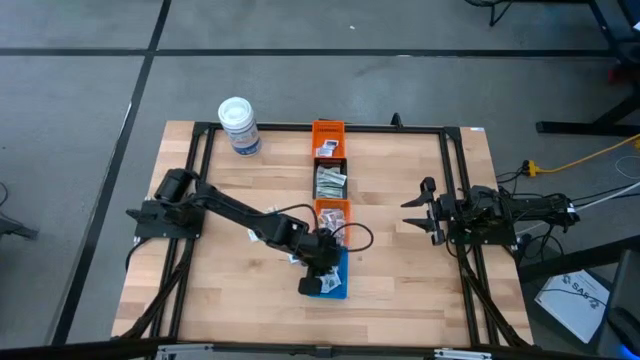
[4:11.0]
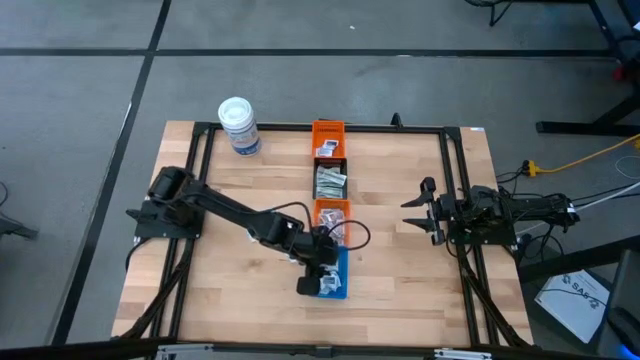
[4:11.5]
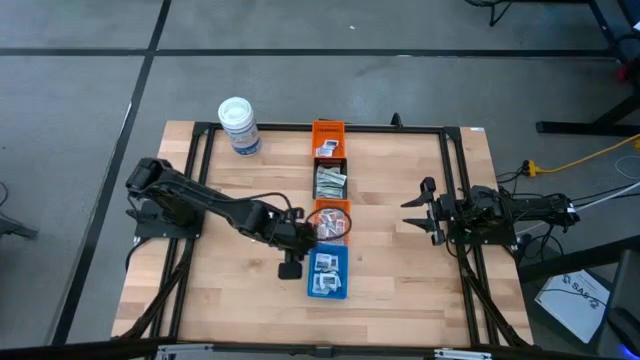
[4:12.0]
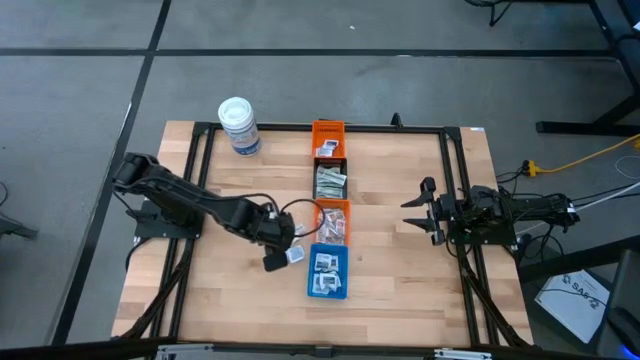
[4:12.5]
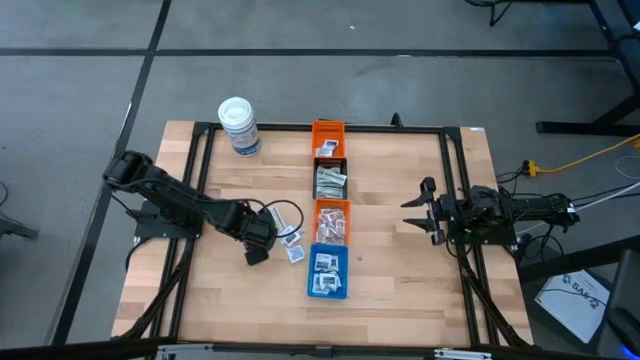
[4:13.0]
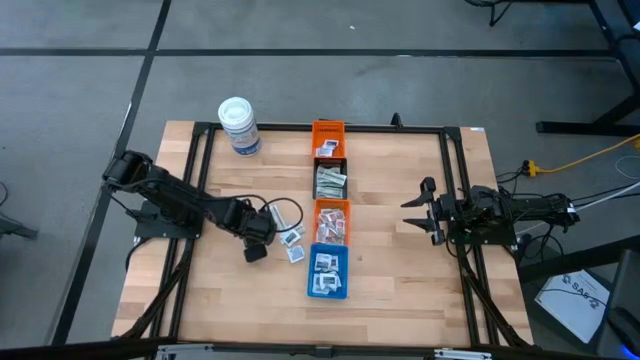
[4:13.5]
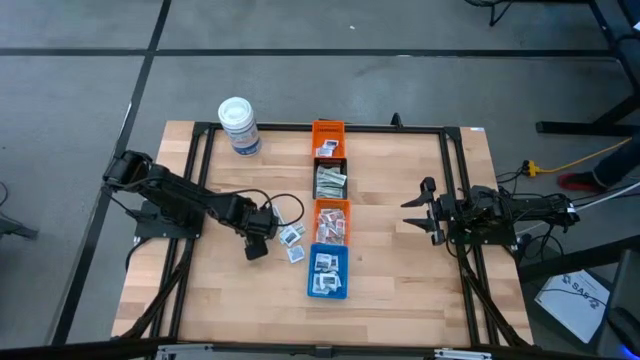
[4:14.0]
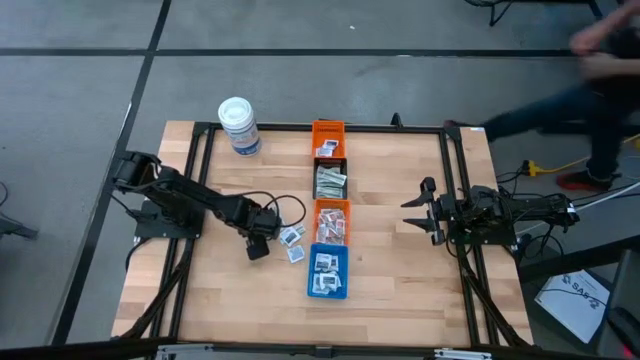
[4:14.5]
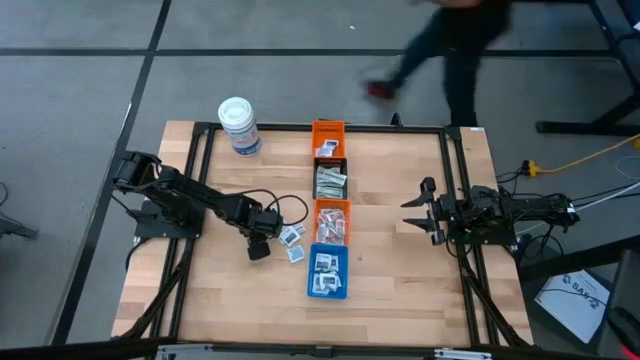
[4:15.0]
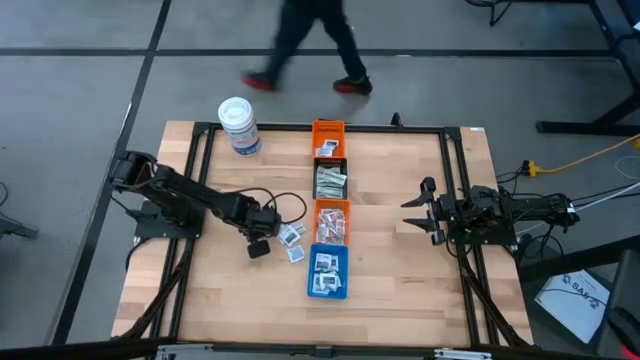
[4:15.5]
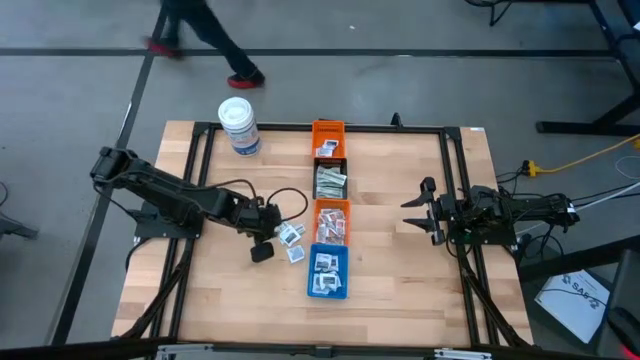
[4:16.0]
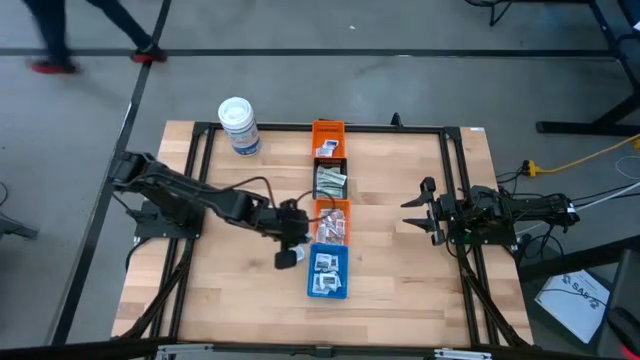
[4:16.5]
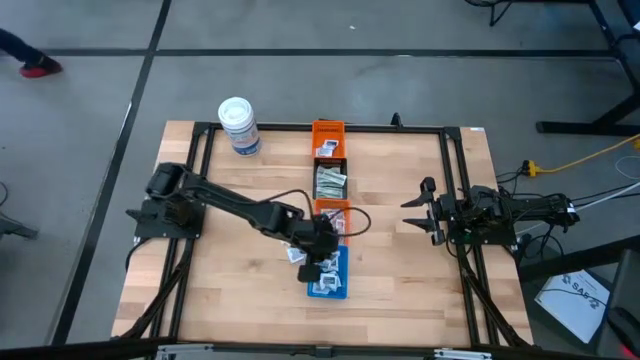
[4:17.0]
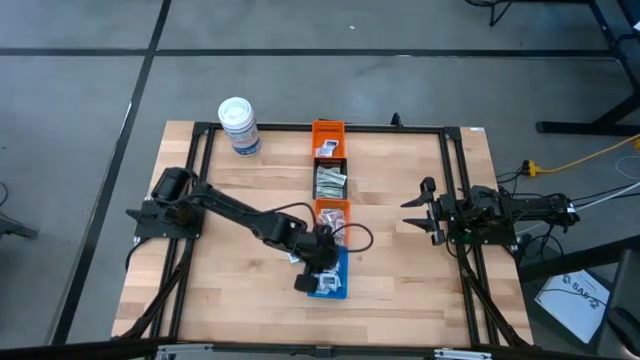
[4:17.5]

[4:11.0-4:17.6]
Task: Pick & Place First Aid Supplies
Put the gray towelette pack into the blue bin

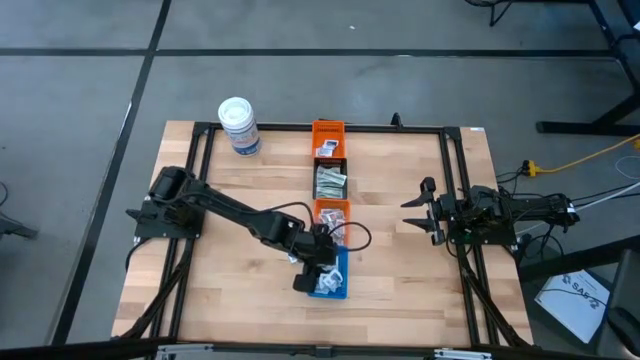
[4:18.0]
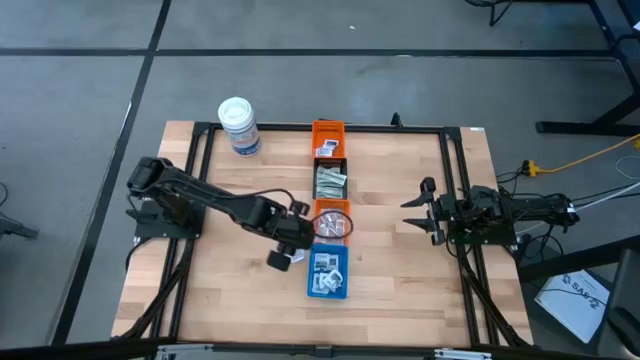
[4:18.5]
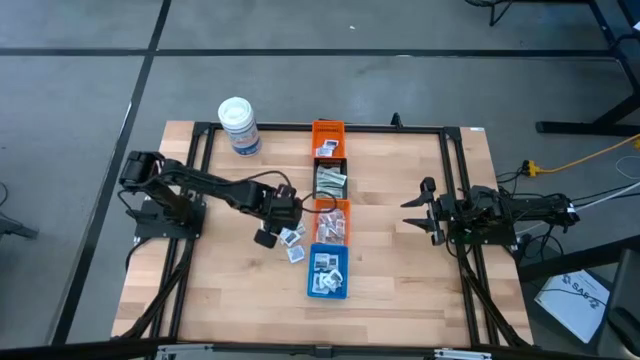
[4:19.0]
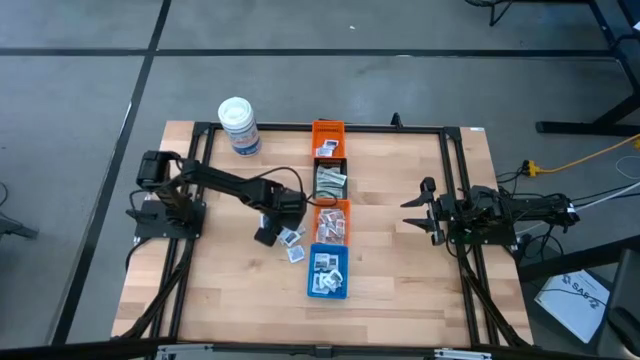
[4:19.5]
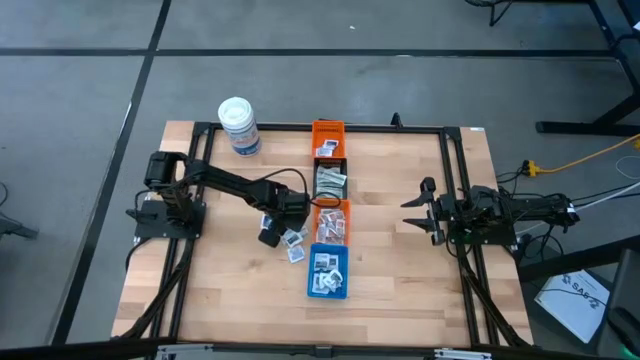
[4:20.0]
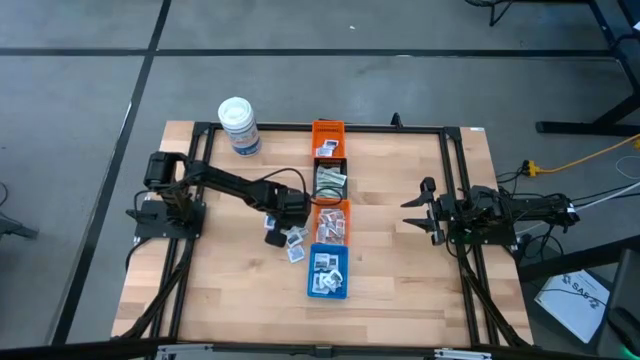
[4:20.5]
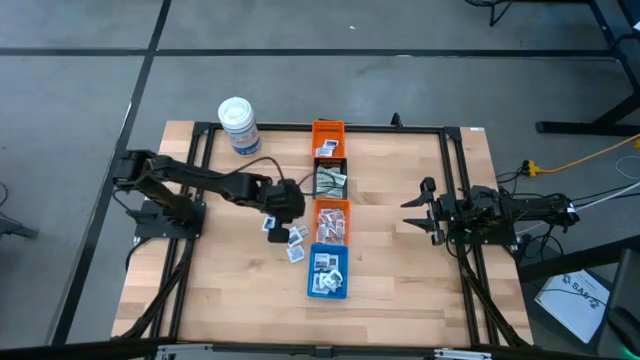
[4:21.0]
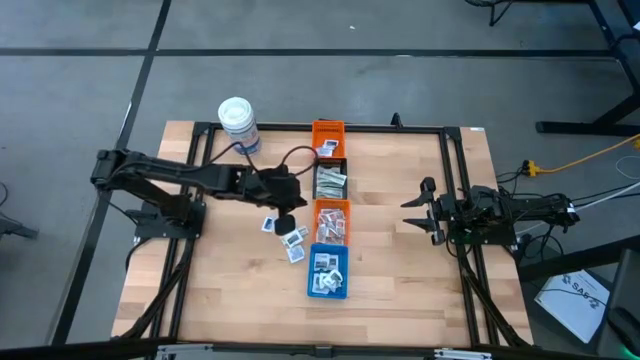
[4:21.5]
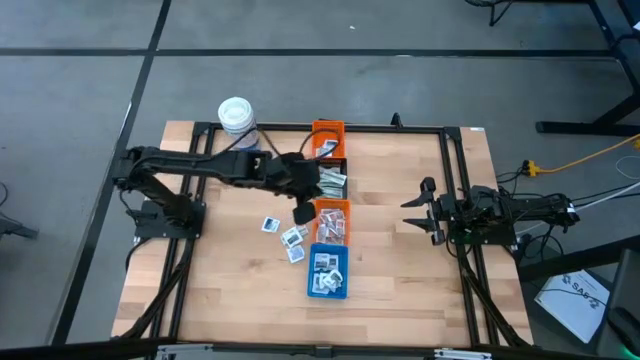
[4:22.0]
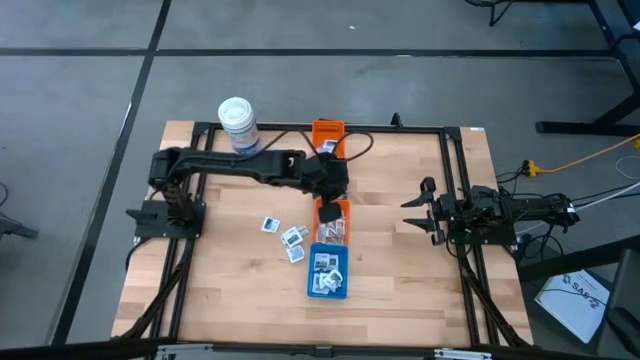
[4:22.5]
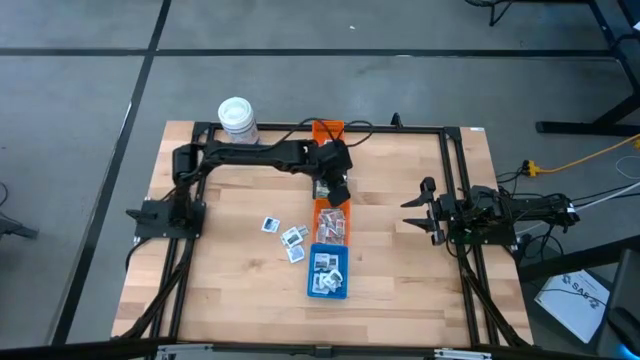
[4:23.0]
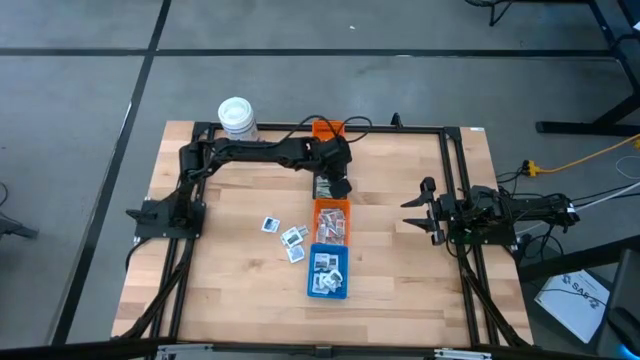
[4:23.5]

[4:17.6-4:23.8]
Put the green bandage into the black bin

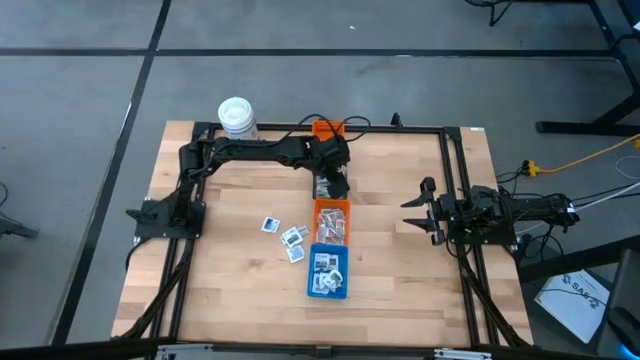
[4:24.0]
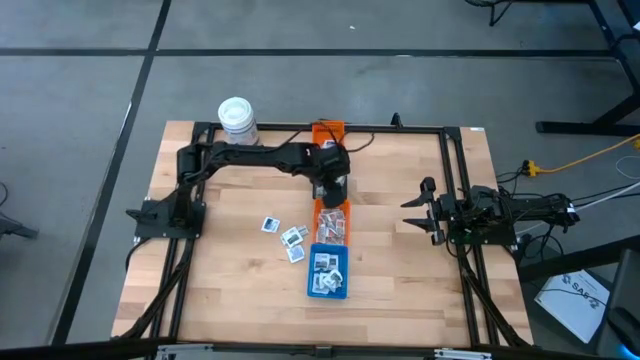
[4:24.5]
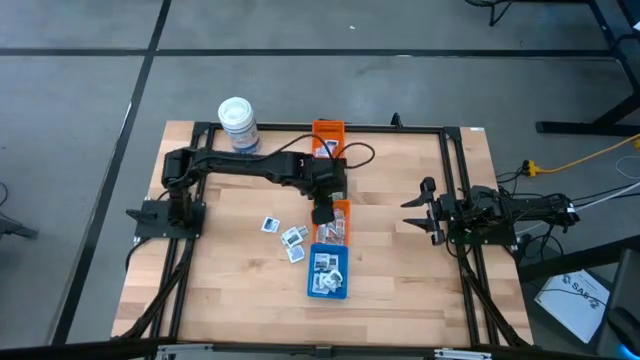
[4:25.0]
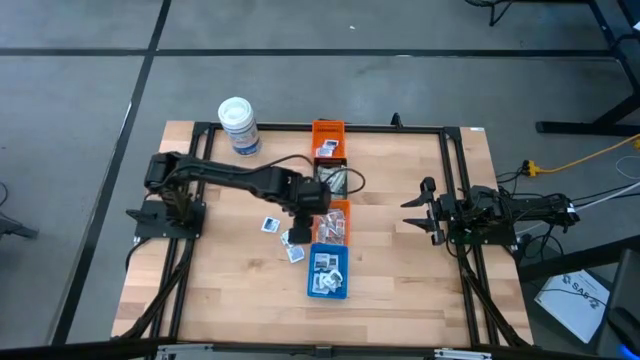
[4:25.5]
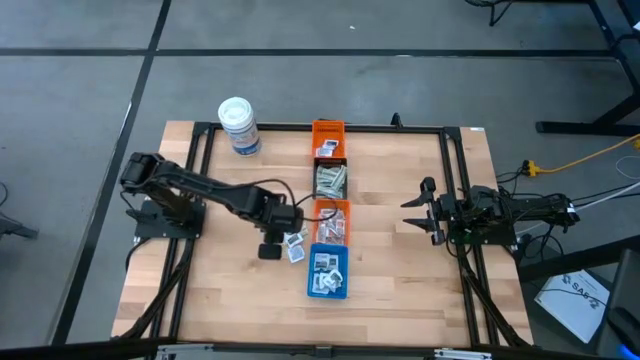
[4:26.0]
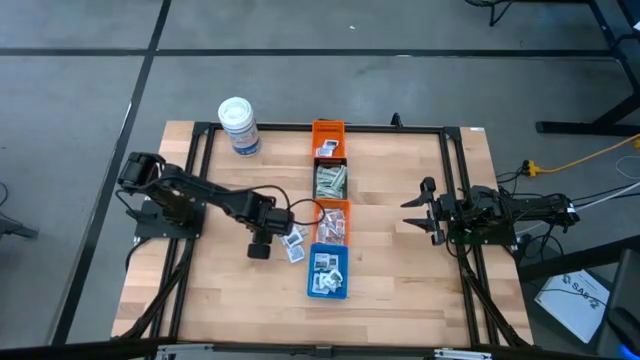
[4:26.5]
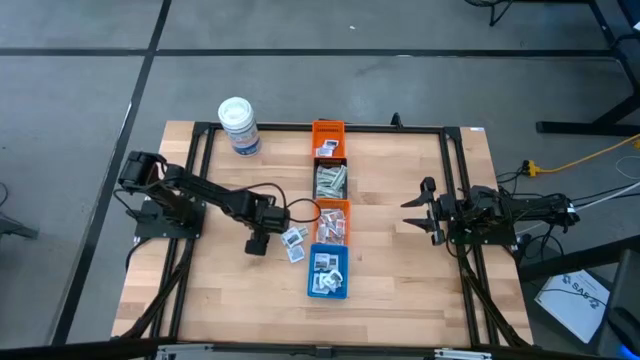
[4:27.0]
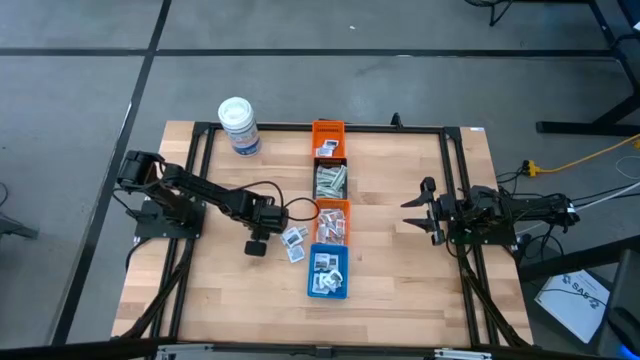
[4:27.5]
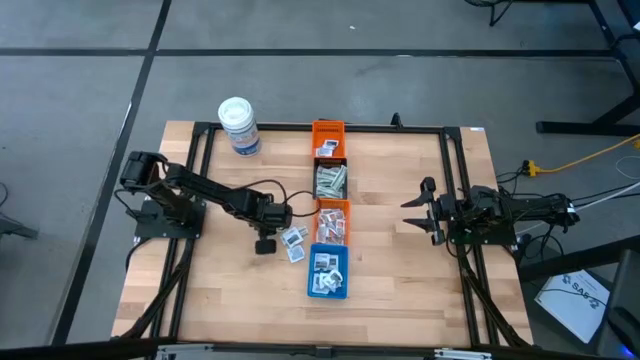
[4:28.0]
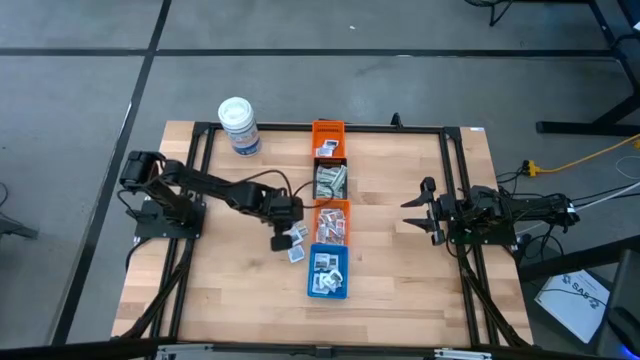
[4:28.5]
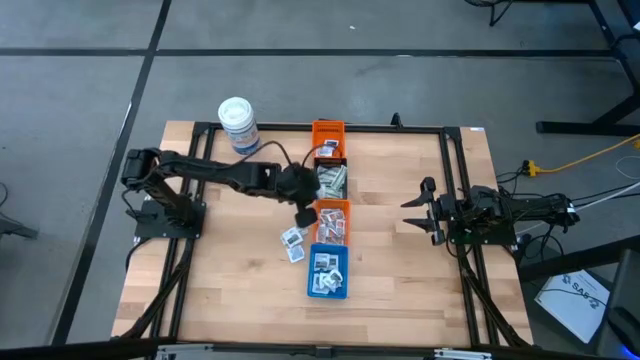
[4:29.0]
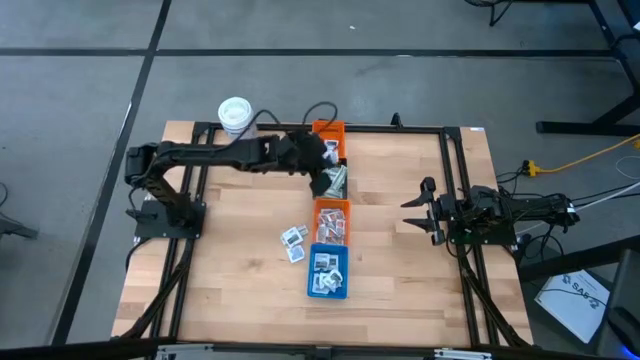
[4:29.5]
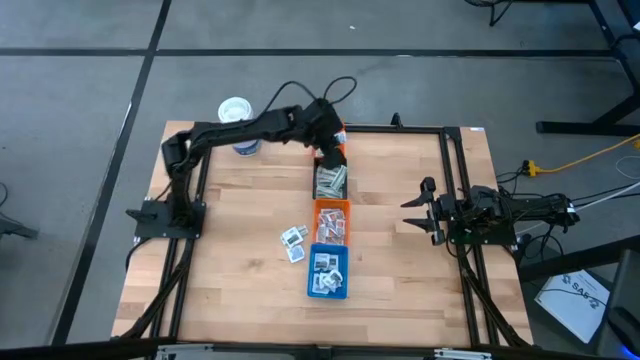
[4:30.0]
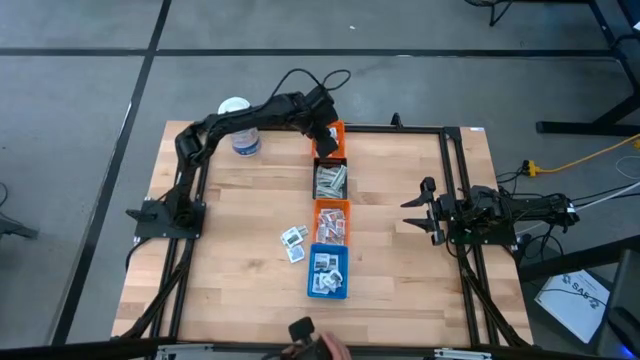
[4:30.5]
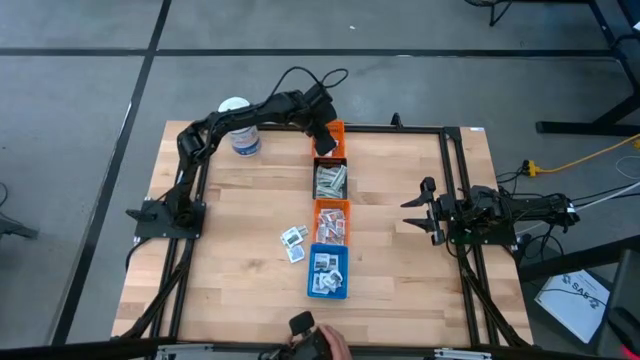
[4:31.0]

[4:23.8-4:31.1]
Put the blue alcohol pad into the top orange bin

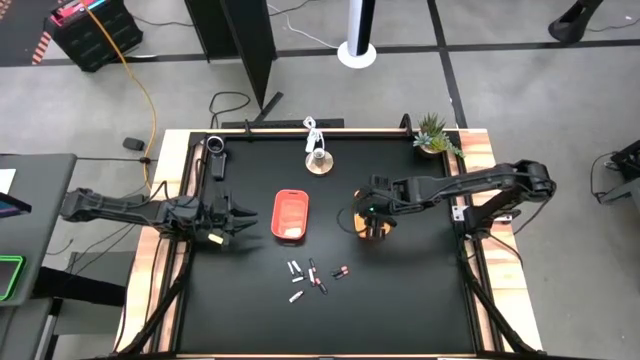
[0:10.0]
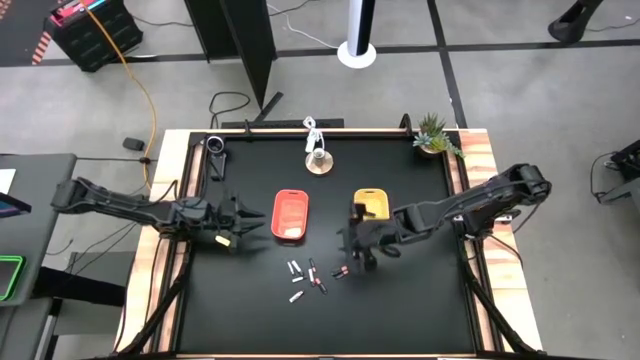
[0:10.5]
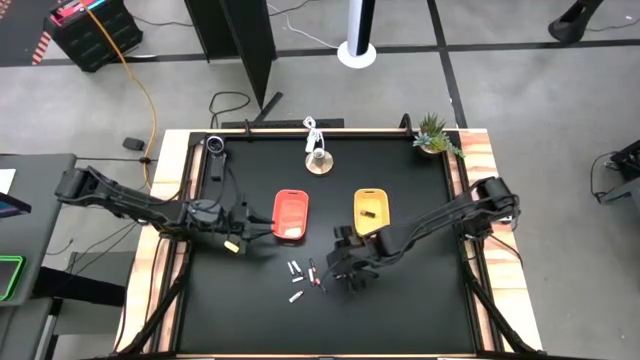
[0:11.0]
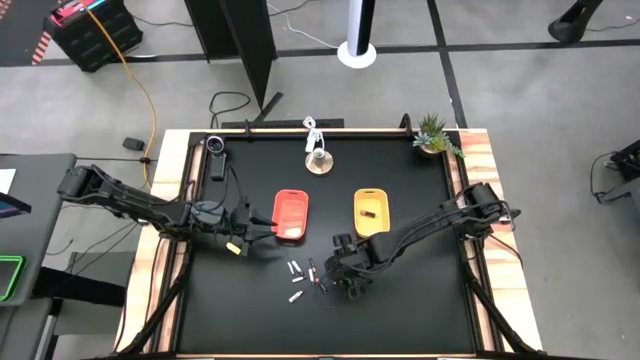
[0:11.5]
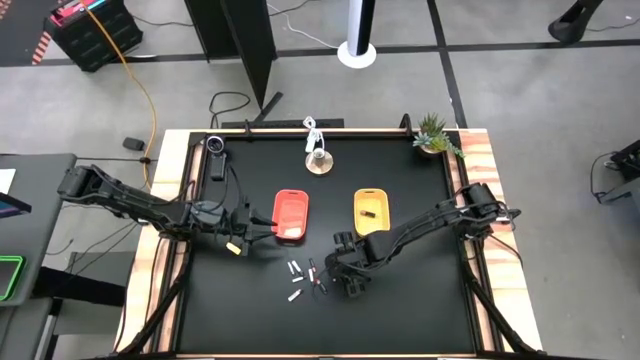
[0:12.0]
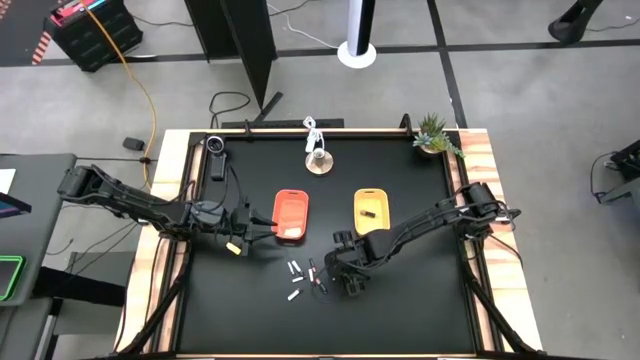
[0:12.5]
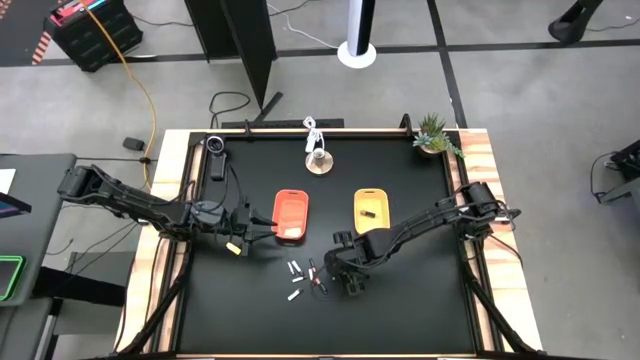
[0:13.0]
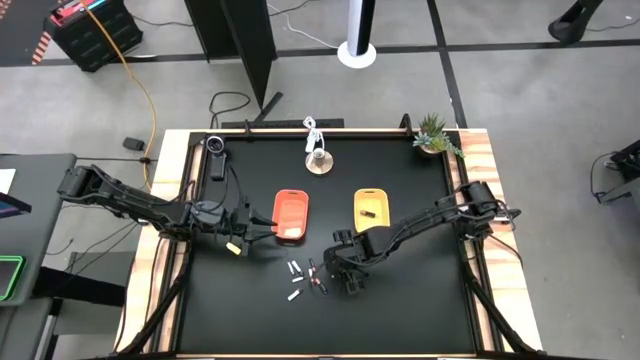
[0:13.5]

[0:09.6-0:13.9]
Task: Sort batteries
Put the black battery into the yellow bin
